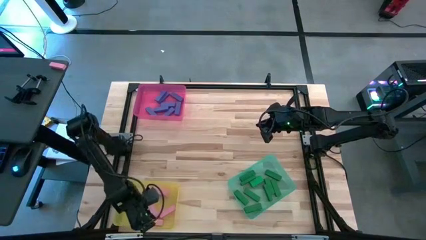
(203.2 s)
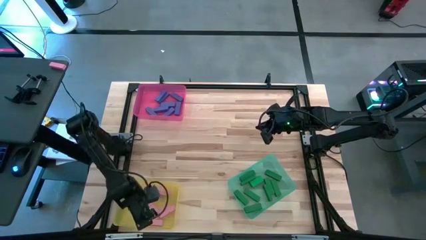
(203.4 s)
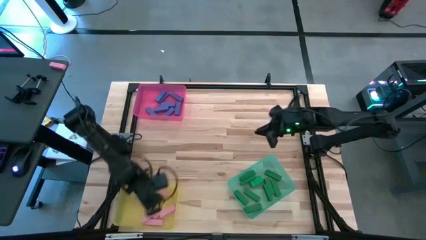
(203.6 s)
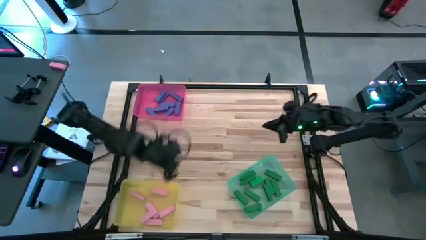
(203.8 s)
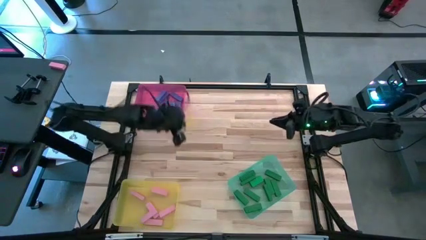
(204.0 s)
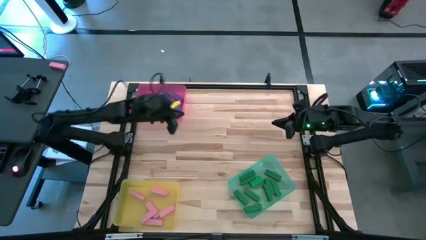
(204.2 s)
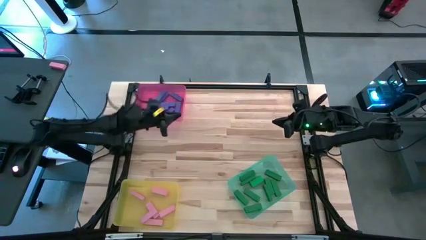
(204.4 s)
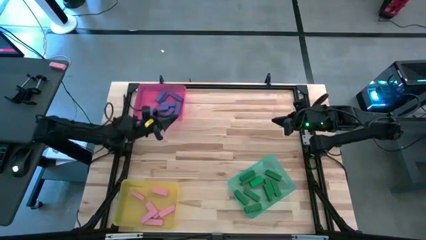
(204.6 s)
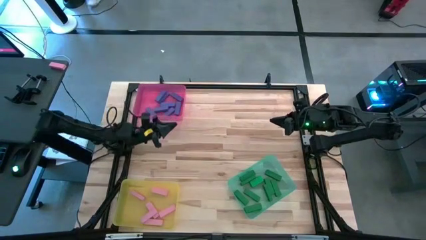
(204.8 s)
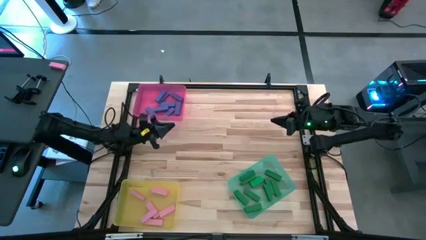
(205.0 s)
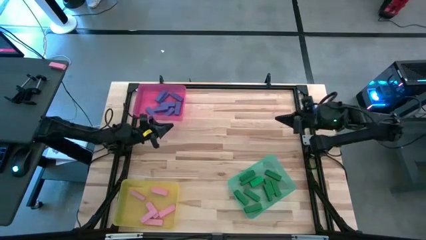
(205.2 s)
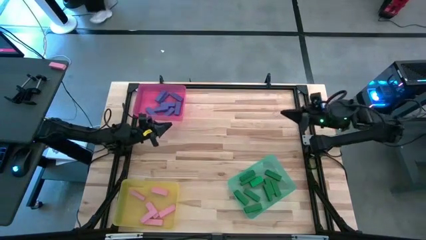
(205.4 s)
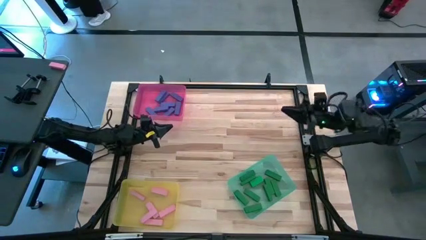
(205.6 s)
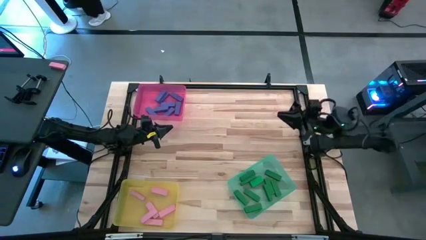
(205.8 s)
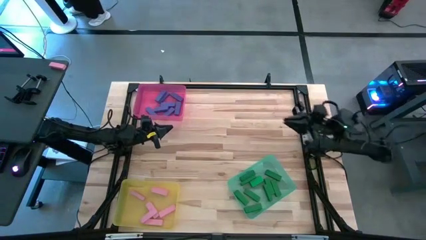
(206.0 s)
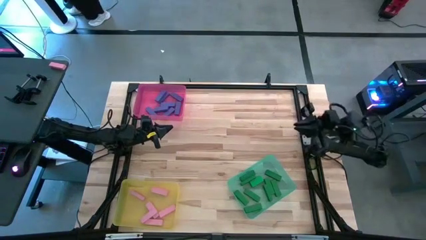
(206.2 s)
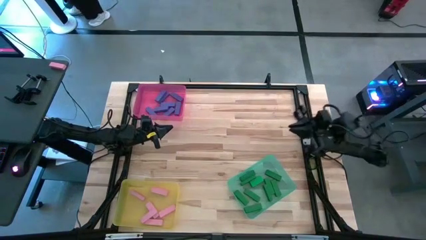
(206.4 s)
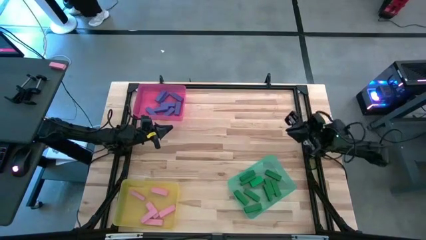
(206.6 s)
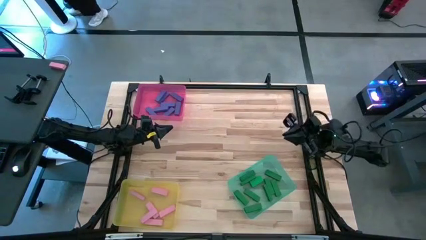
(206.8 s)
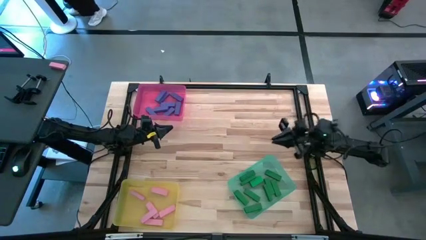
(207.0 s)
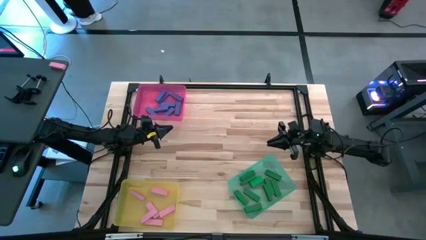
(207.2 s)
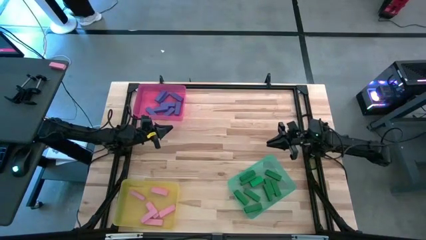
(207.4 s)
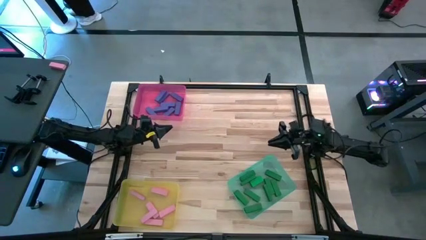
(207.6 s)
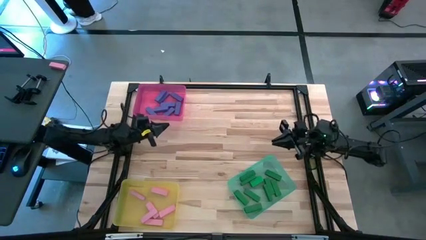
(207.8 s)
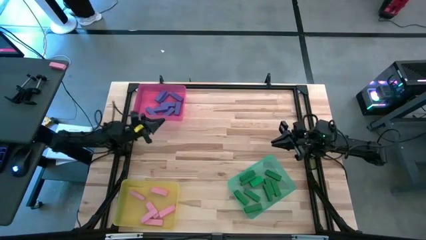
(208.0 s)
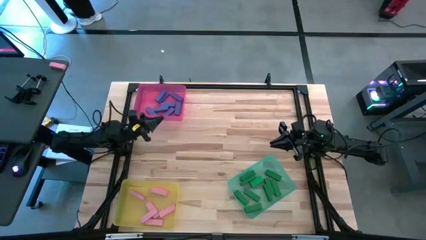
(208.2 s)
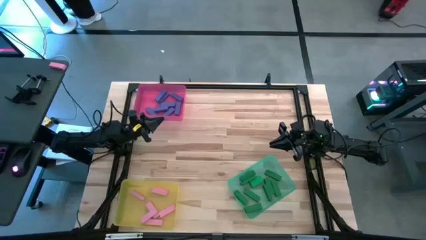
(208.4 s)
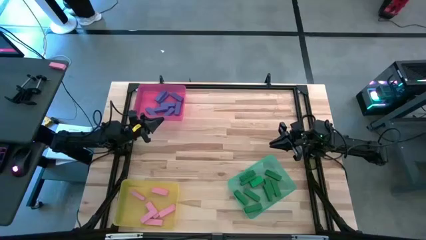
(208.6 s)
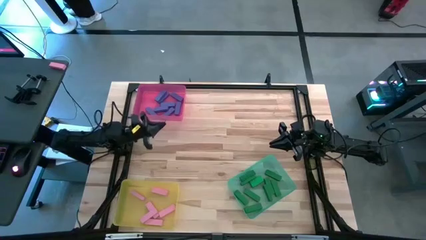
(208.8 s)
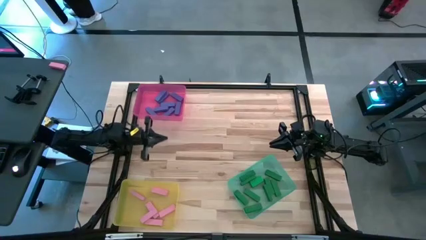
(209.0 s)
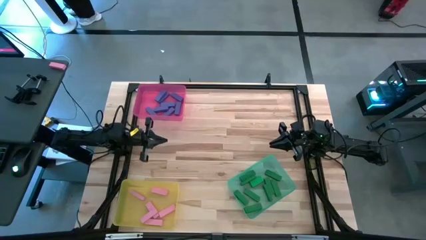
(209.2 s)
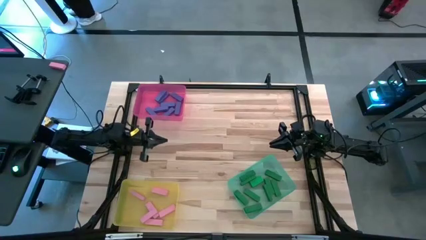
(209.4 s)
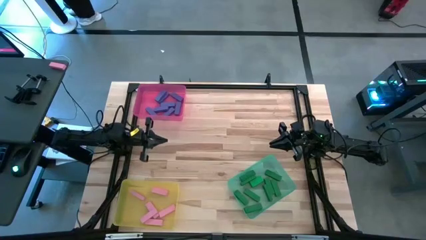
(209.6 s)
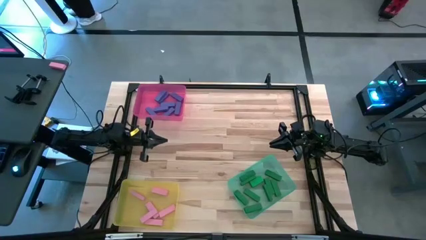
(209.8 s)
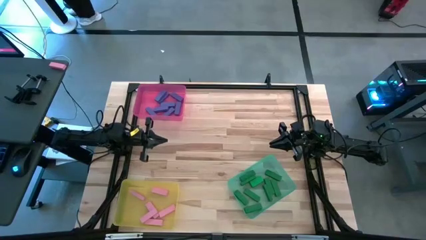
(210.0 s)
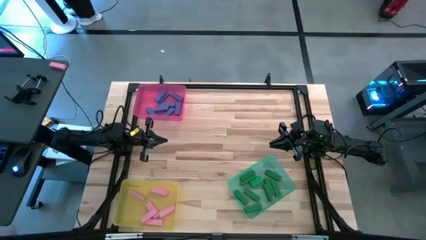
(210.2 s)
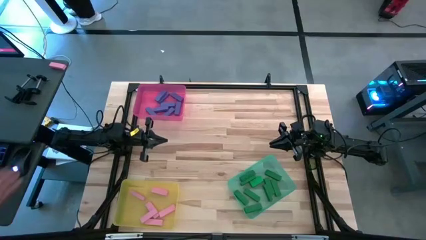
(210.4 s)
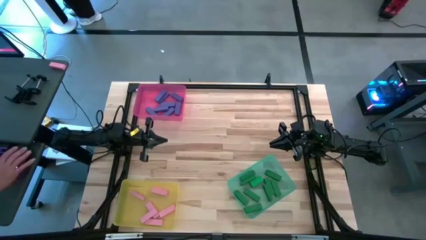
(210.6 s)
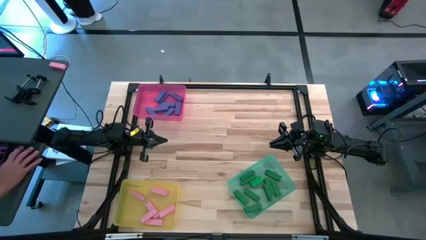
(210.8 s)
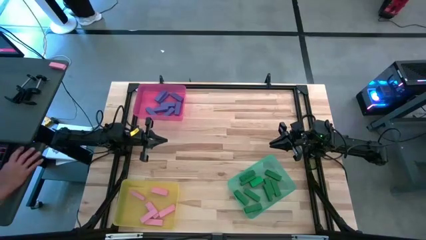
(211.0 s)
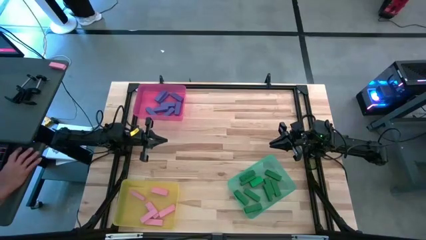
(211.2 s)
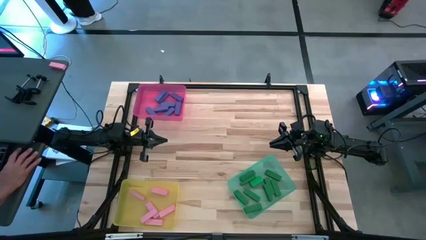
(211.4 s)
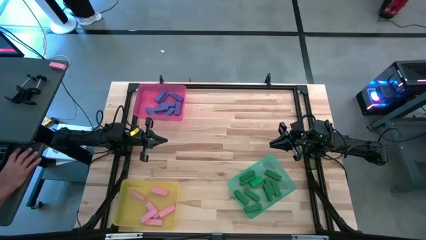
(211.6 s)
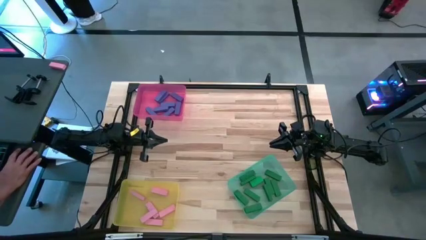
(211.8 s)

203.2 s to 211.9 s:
Task: Sort blocks
Return to Home Position

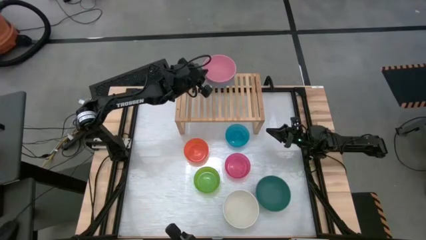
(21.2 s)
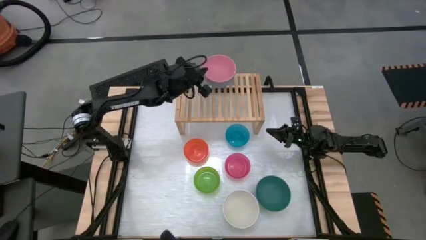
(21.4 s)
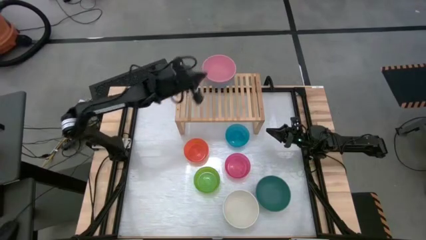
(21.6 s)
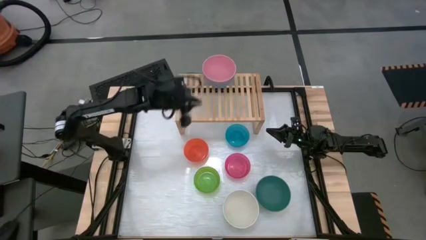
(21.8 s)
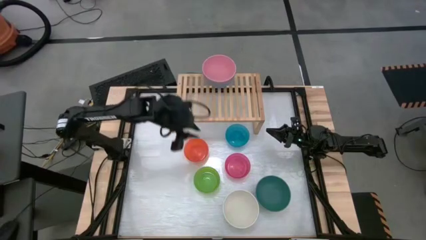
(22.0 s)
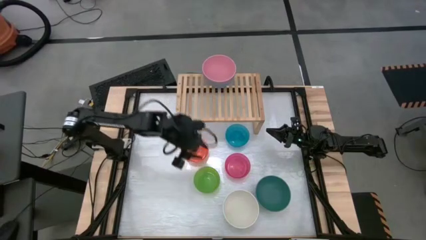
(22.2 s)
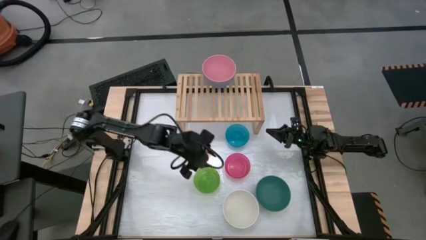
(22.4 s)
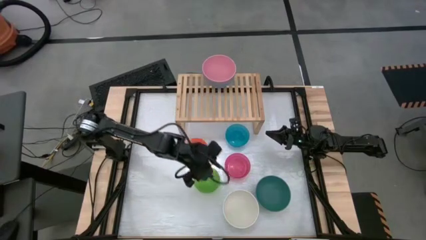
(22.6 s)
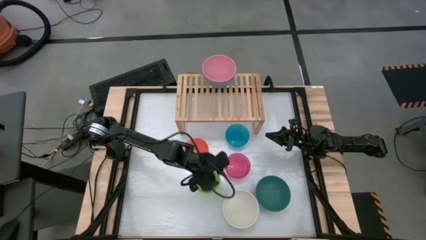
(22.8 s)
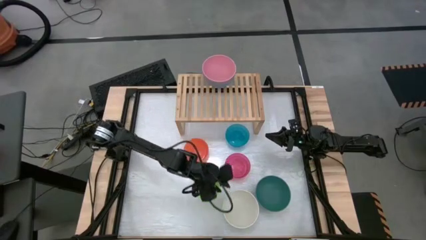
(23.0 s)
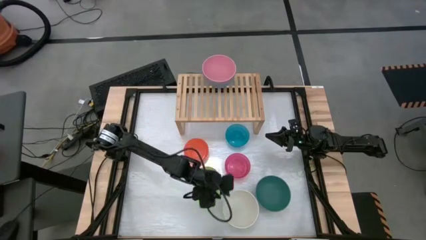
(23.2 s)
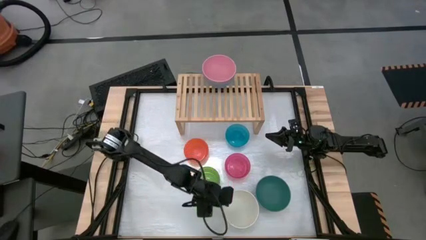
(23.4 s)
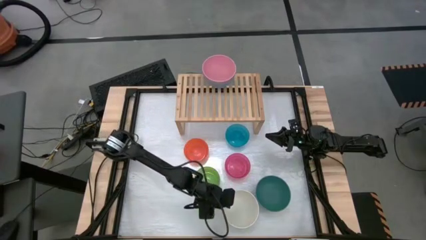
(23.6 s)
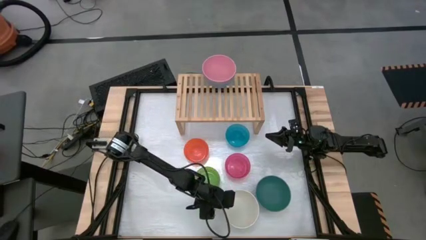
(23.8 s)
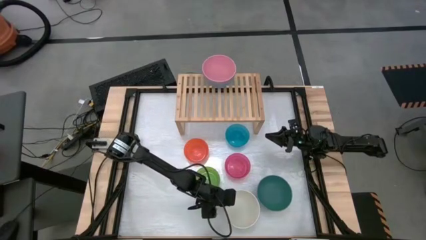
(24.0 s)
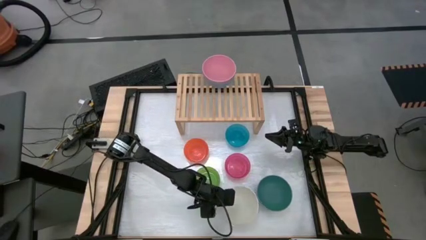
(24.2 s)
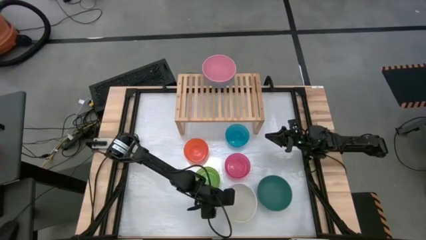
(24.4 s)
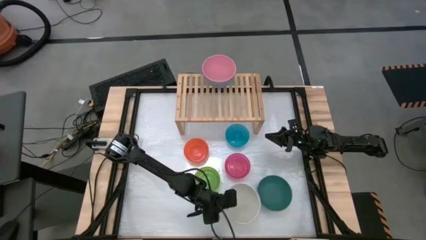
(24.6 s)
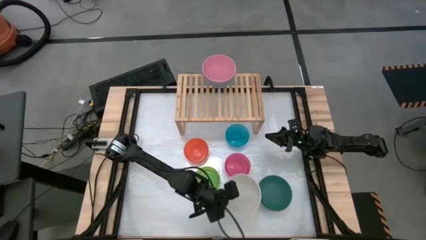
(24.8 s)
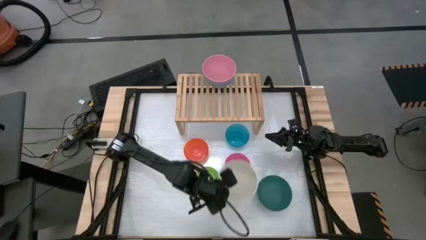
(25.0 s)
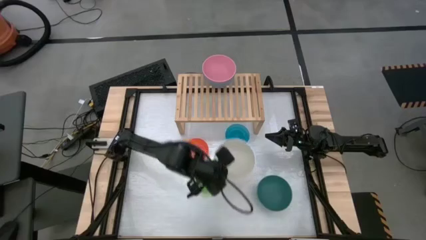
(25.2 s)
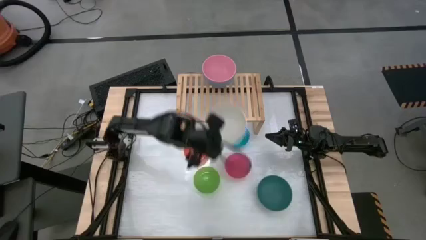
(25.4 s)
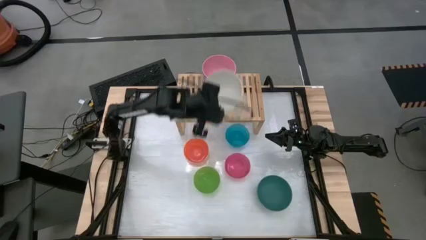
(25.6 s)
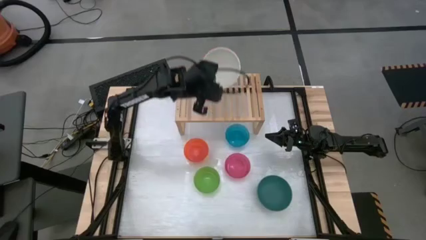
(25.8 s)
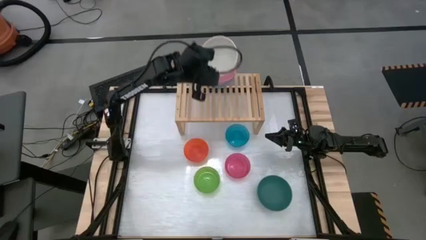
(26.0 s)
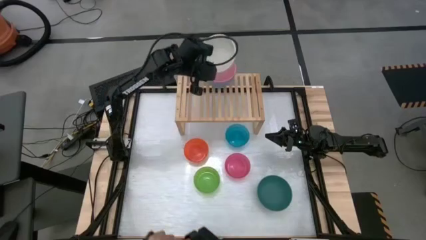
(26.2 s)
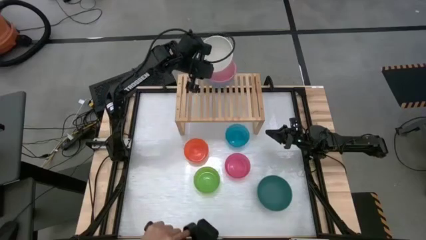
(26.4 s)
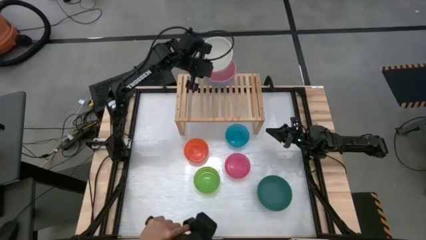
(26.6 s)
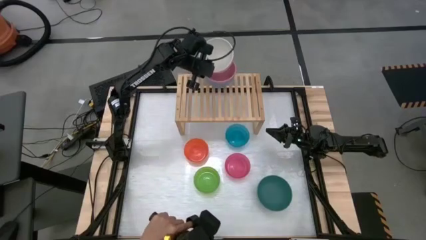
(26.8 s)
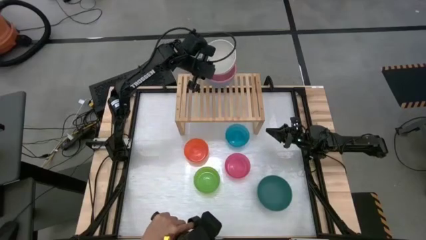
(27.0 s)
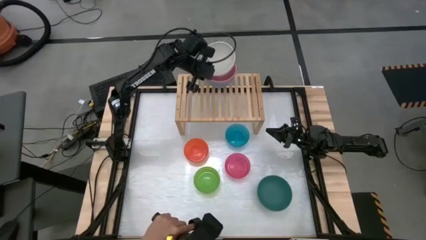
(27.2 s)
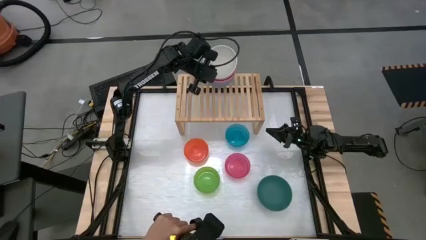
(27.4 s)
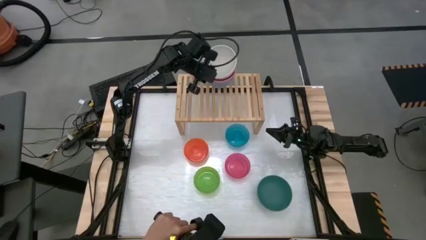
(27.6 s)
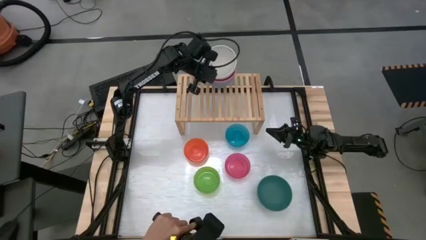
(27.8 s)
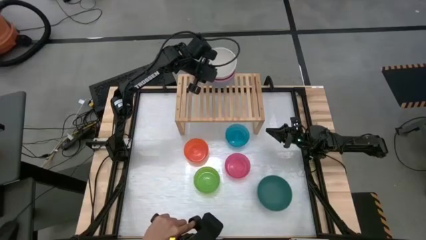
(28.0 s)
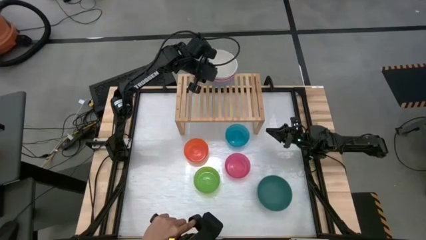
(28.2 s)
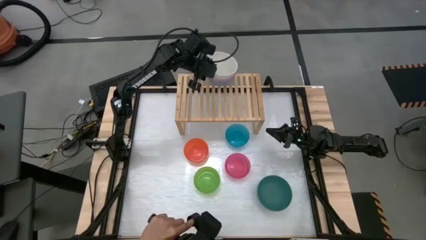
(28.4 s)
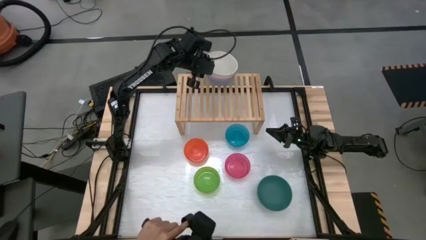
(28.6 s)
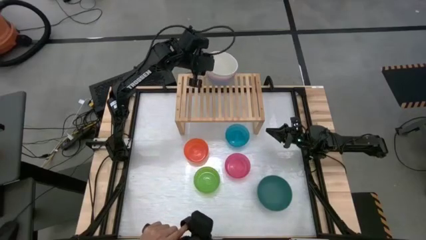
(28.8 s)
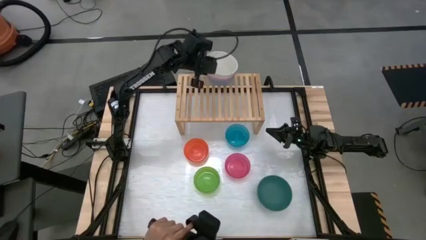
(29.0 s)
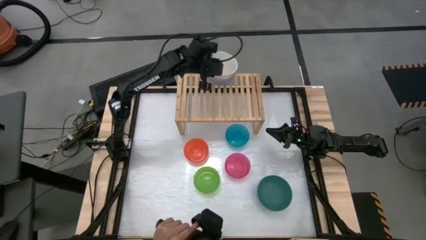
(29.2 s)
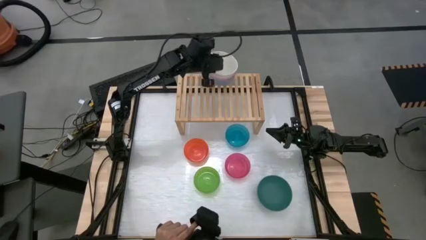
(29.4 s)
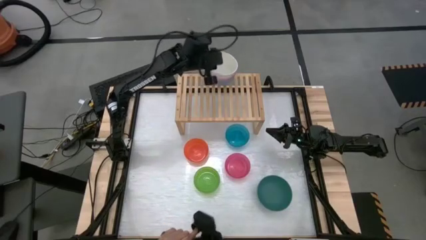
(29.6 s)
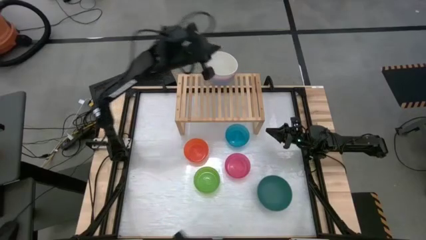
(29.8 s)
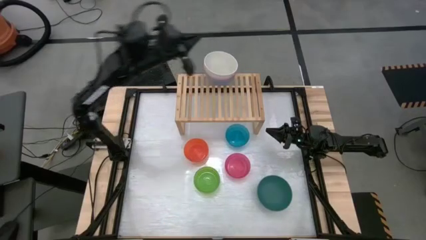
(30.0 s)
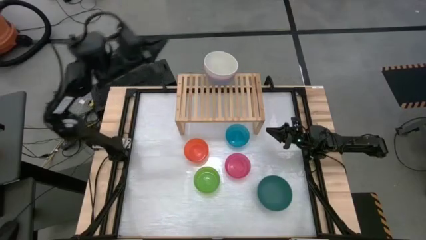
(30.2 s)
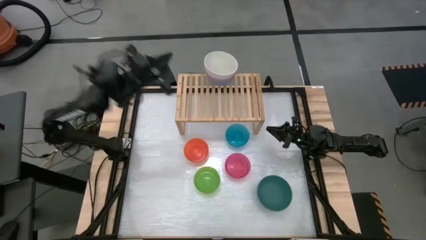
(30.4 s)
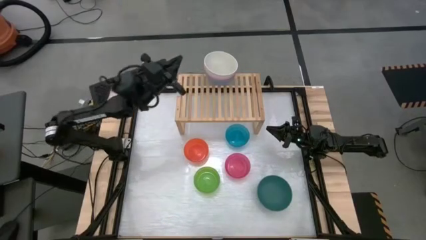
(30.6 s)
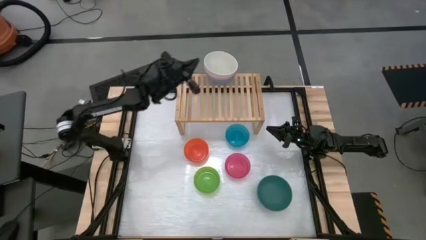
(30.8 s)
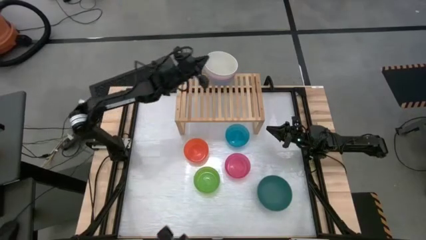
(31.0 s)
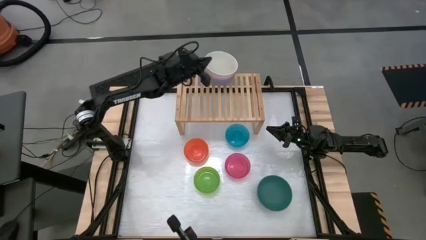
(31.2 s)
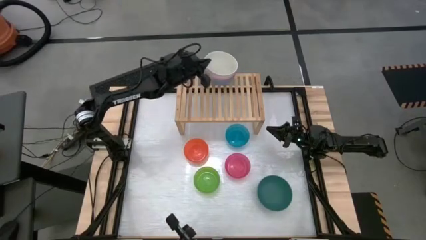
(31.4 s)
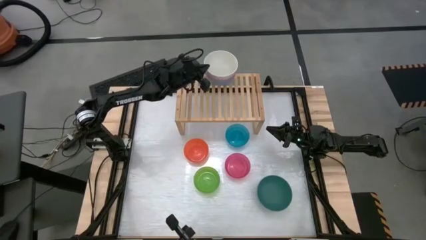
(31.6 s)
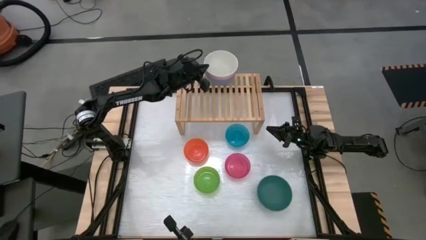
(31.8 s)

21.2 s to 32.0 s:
Task: Place and stack bowls onto a shelf
Stack the white bowl on top of the pink bowl on the shelf
